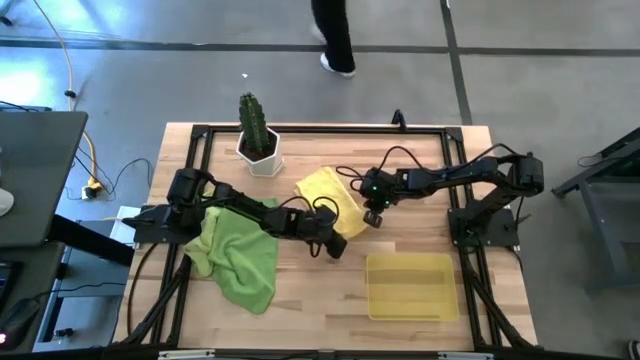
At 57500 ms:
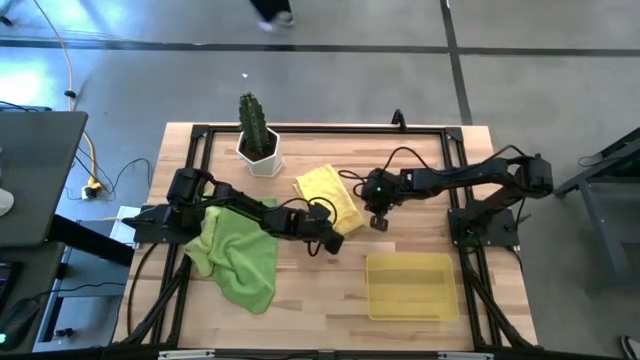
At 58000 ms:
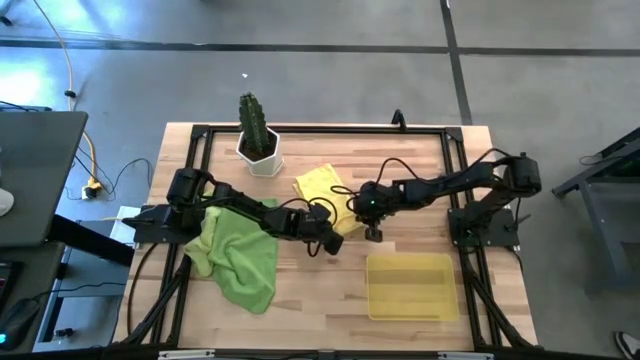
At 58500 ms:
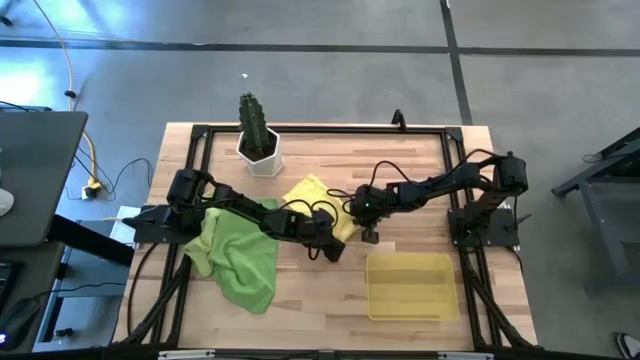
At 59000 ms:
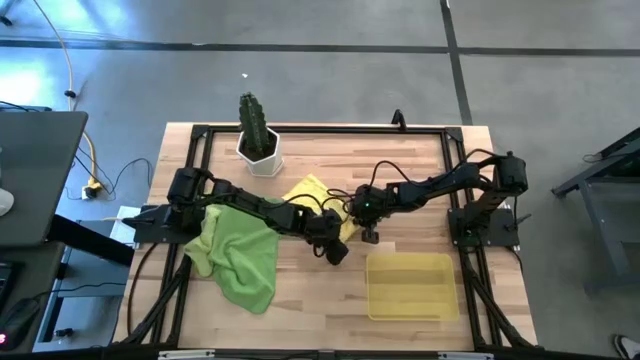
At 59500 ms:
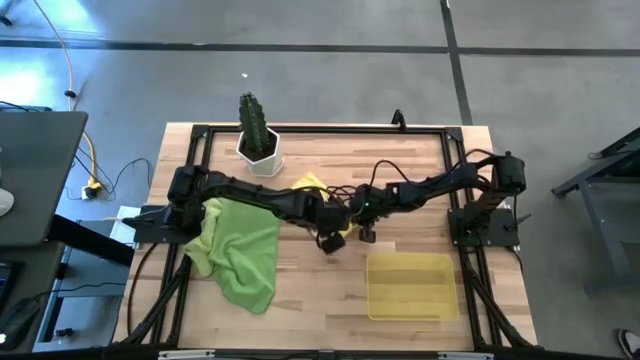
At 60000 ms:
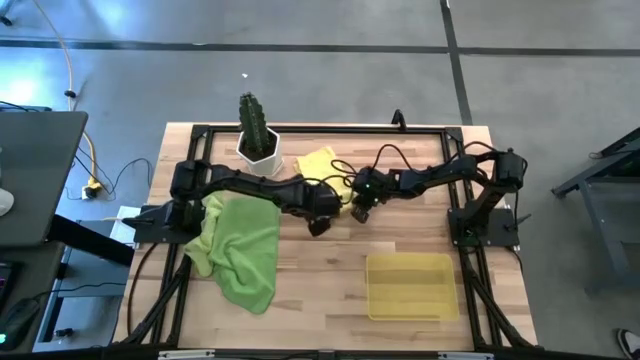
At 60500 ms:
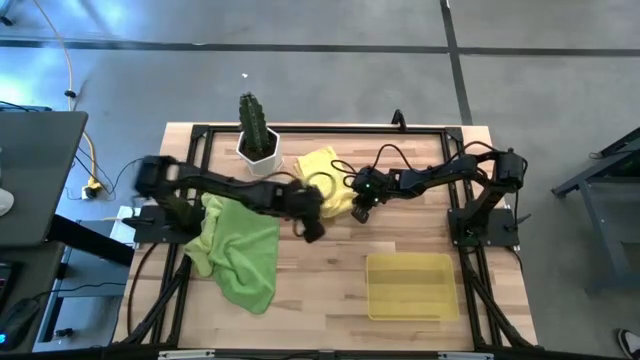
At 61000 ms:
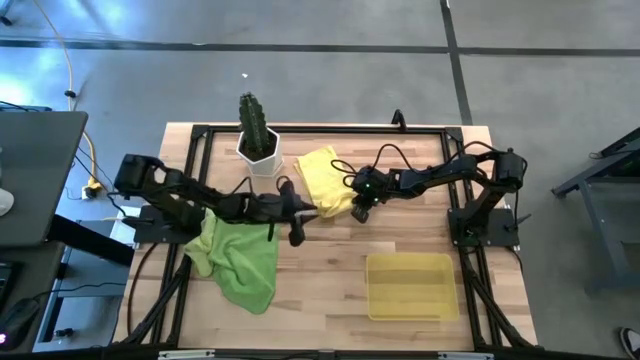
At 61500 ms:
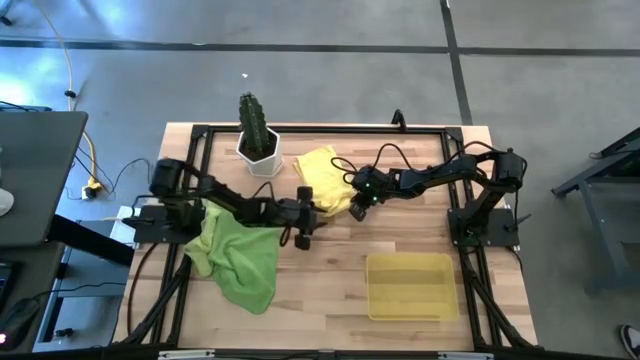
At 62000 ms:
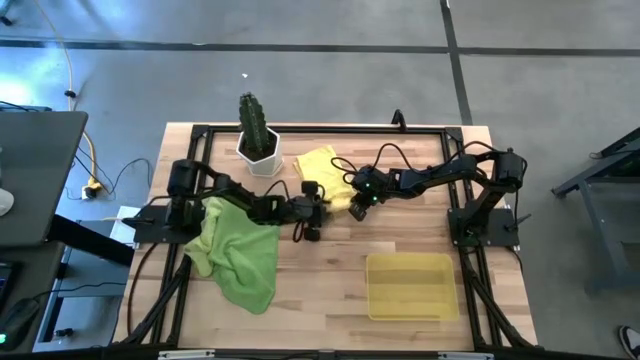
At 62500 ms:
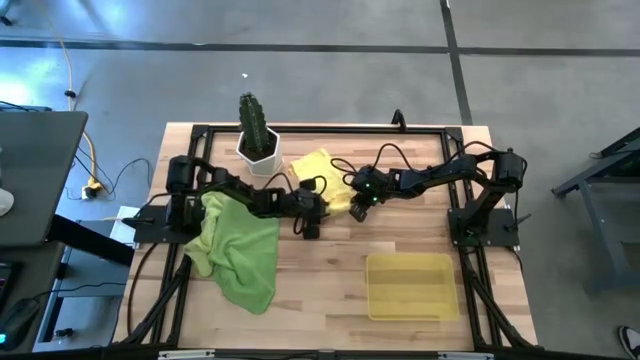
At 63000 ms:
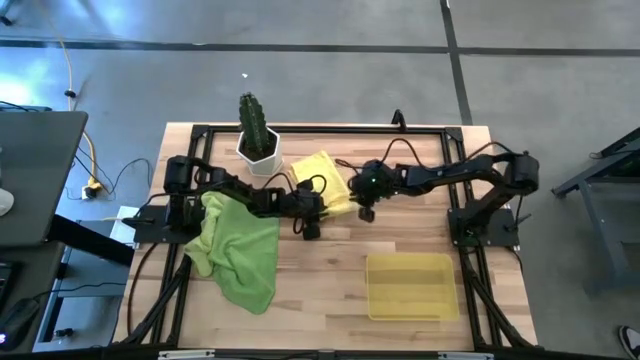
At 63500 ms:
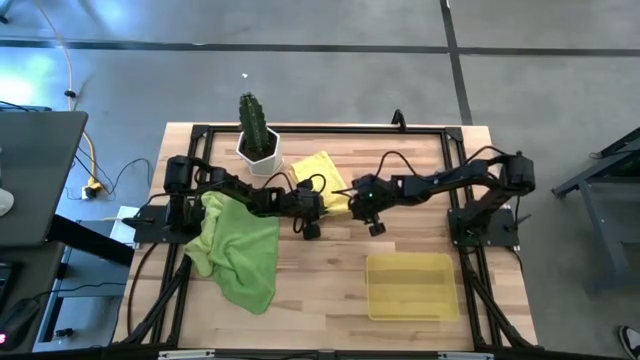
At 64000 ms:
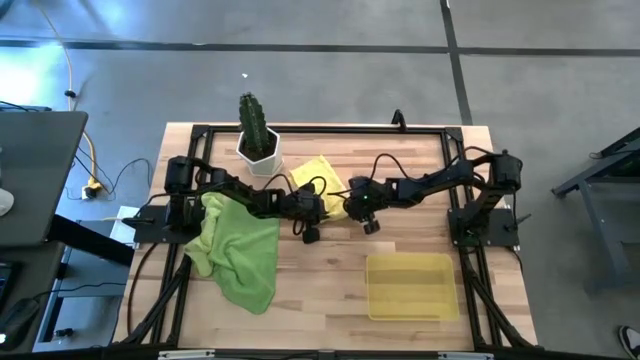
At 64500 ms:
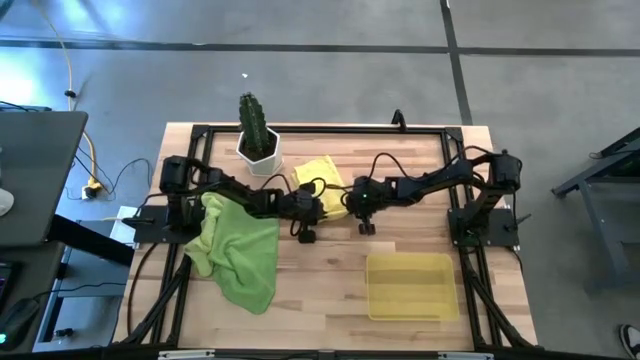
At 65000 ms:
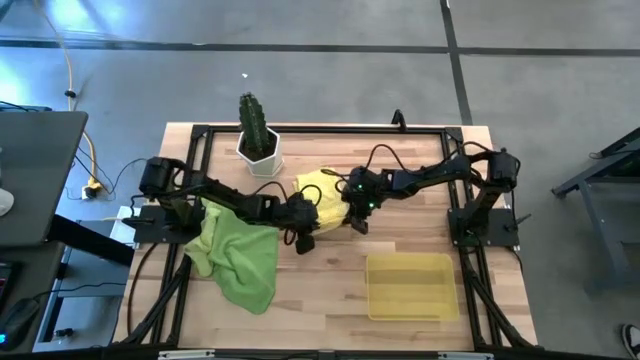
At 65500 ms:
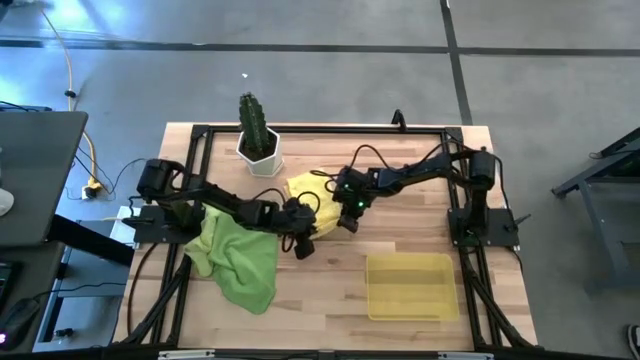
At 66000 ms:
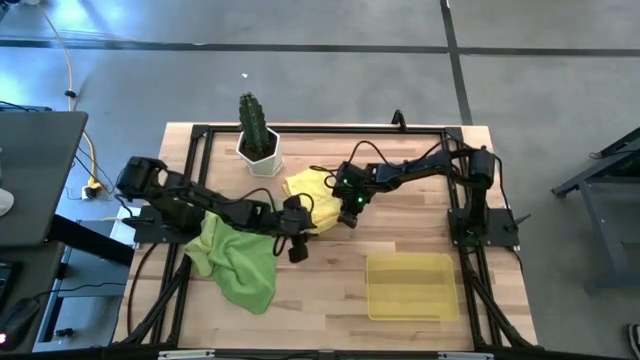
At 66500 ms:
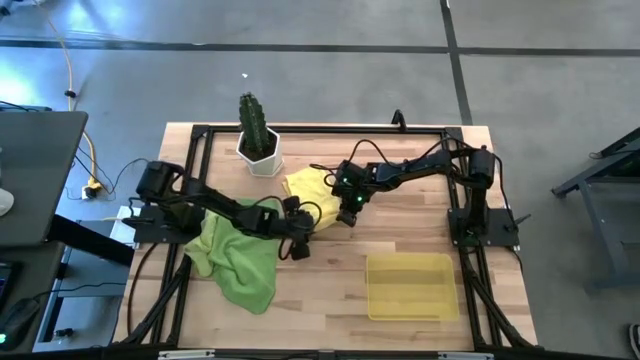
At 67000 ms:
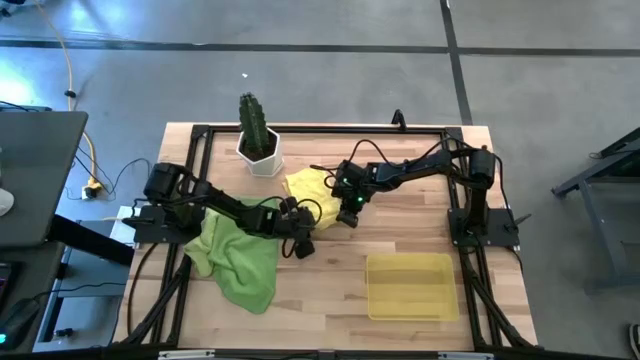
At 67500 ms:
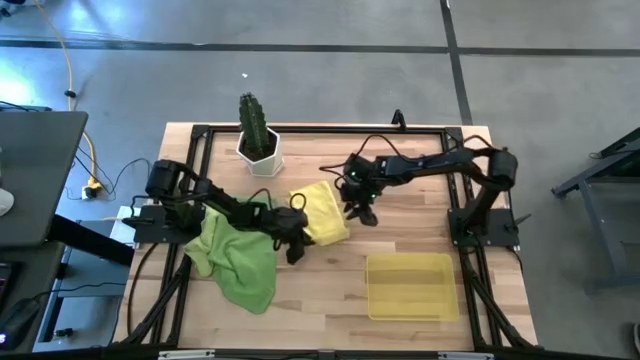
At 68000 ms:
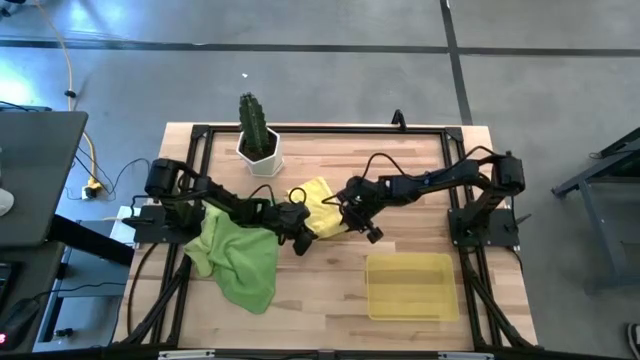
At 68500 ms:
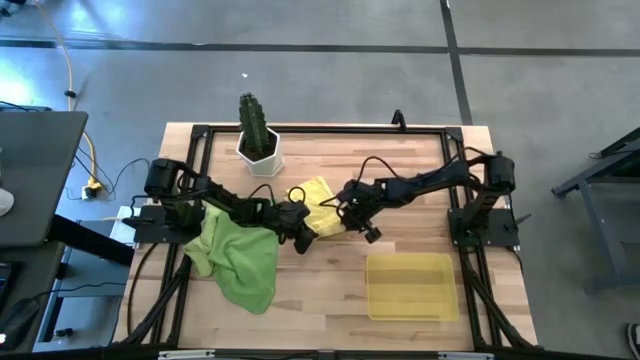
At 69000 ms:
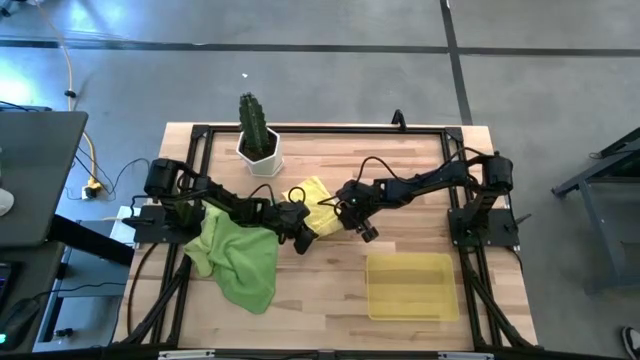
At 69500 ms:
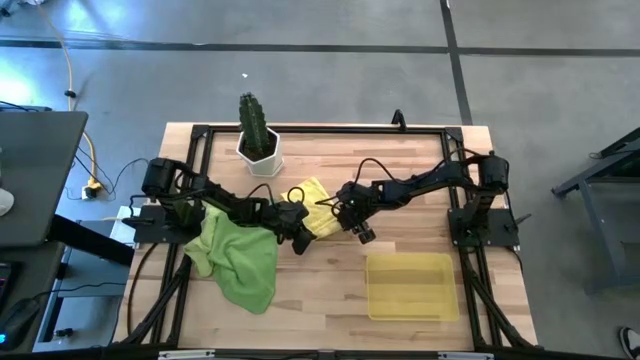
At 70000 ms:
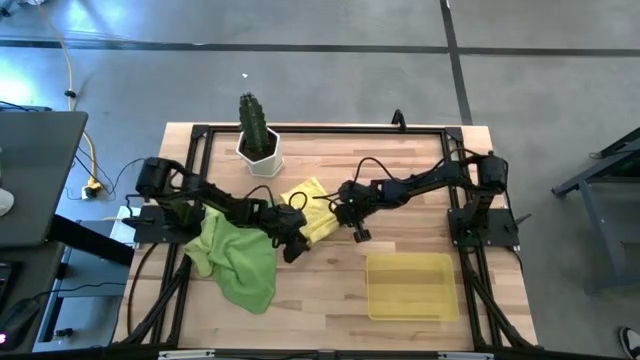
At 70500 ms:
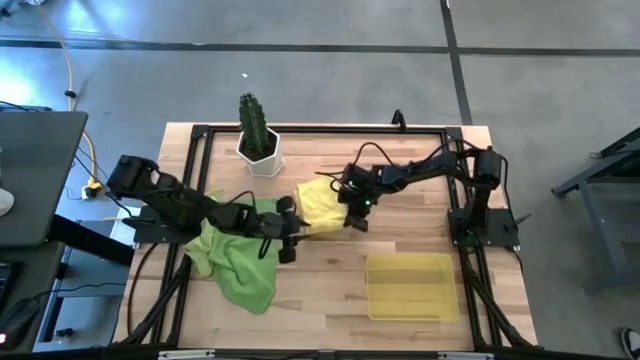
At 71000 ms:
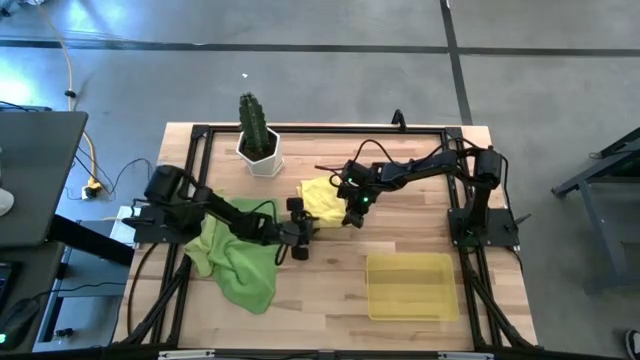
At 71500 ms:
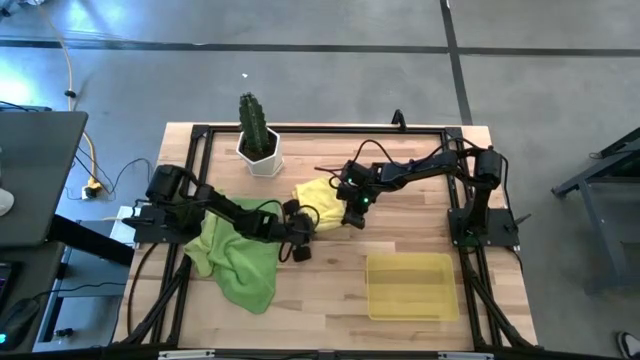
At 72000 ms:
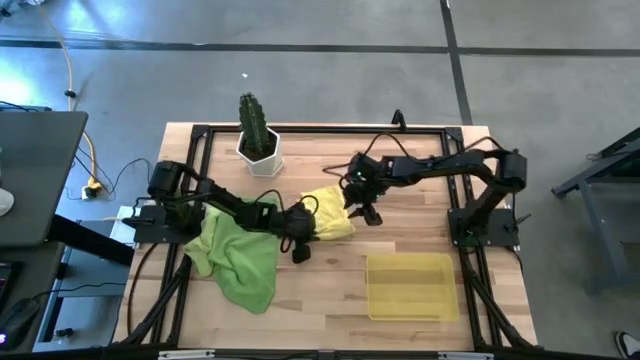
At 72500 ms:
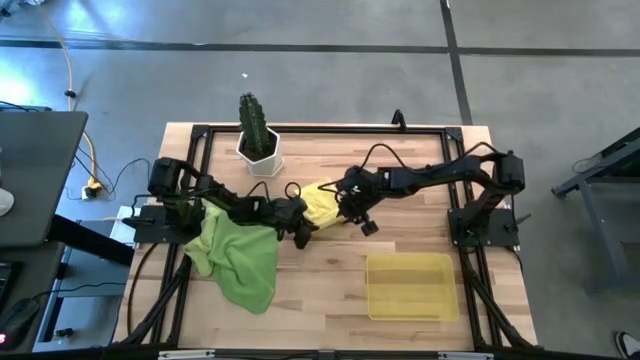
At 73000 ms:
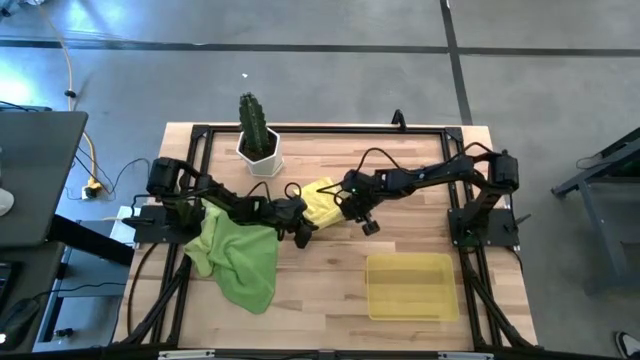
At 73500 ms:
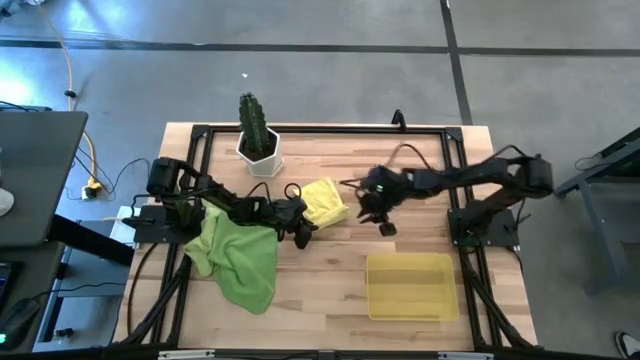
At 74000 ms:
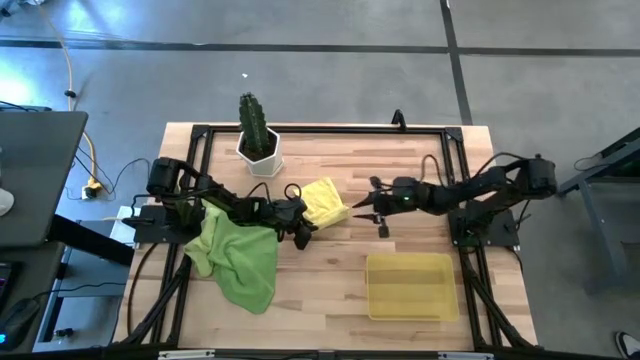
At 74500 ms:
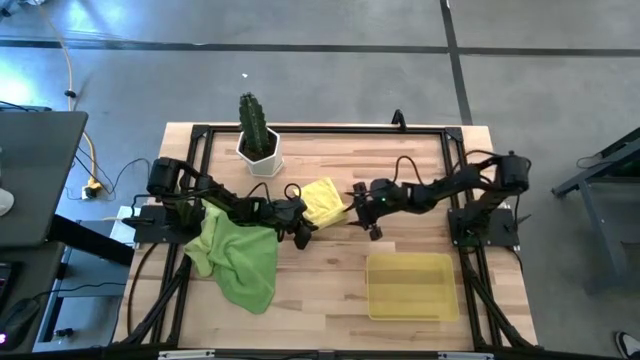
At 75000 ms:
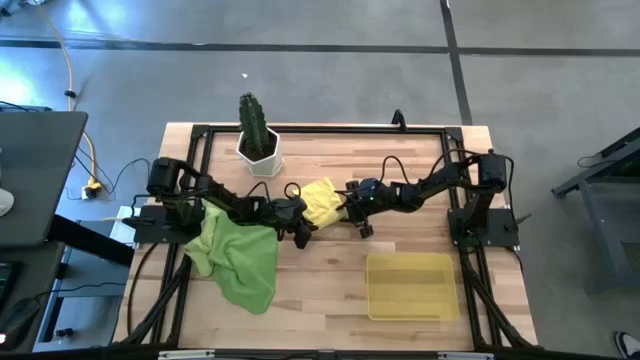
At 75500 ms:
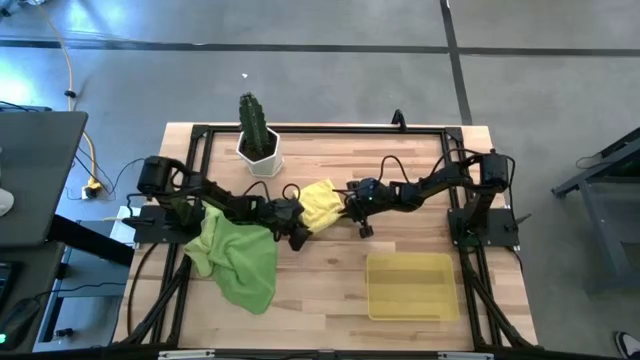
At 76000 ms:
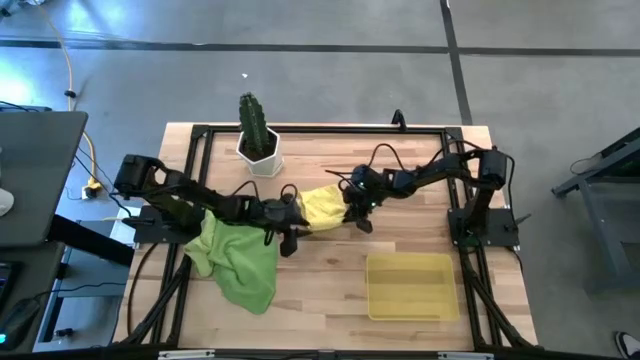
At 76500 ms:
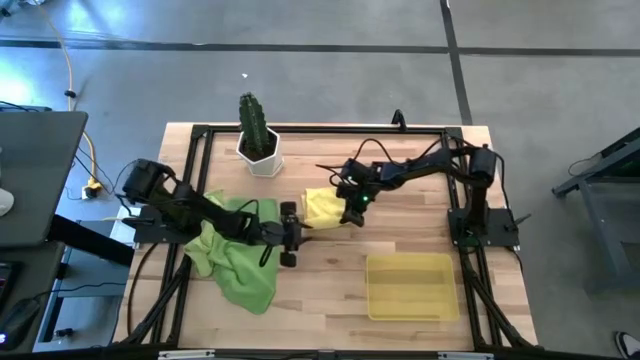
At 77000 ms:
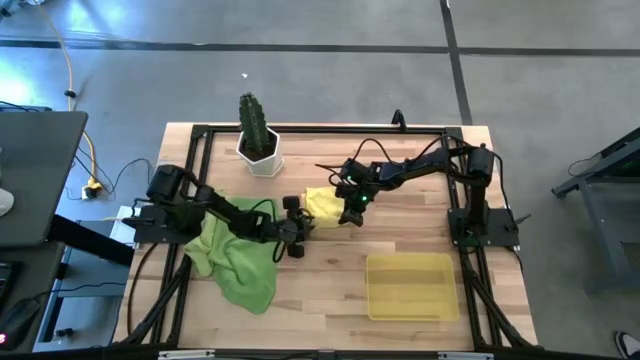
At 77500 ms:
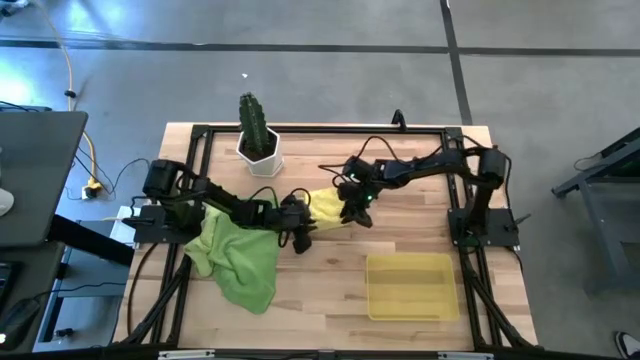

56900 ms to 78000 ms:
Task: Roll microfiber towels into tight, uniform cylinder then place into a basket
Roll the yellow towel

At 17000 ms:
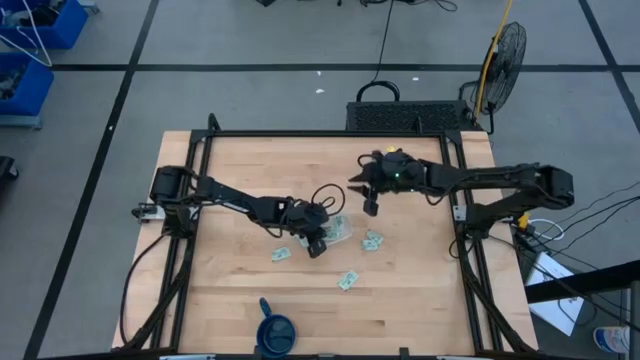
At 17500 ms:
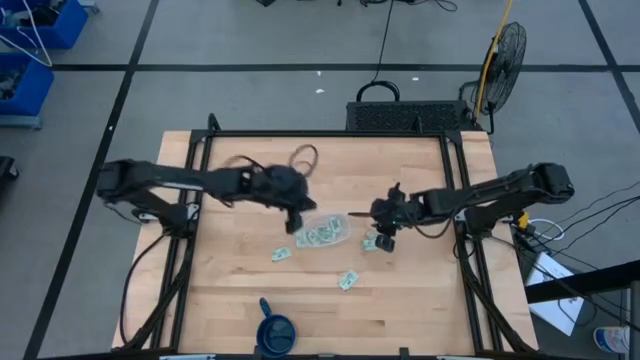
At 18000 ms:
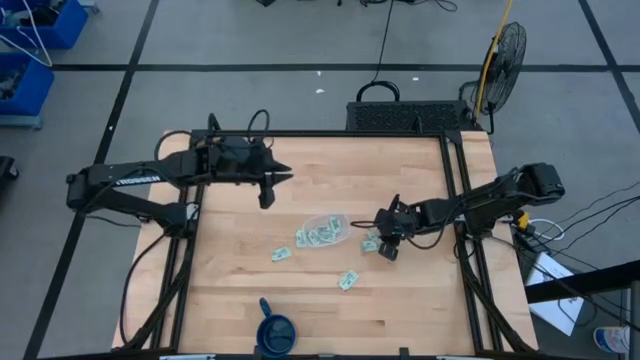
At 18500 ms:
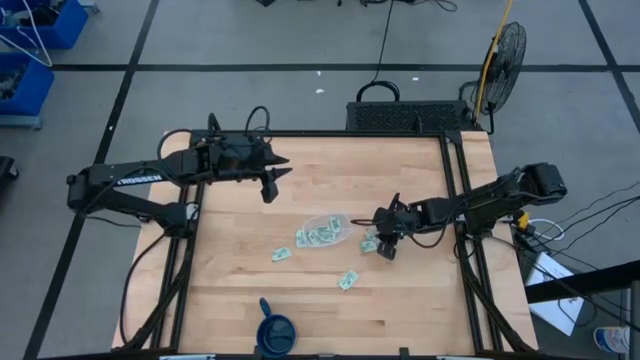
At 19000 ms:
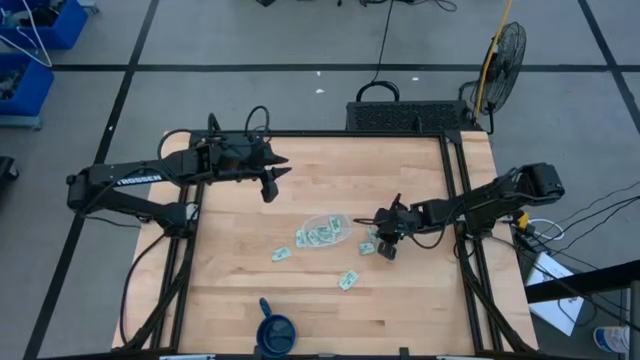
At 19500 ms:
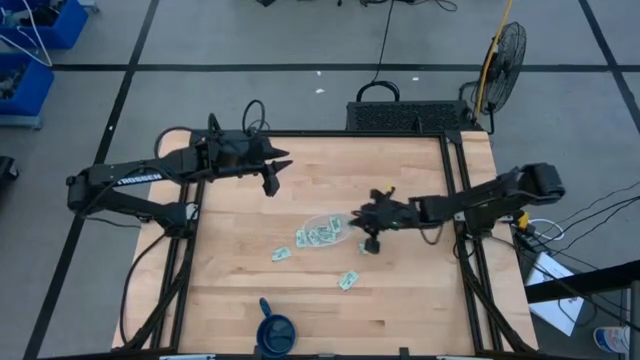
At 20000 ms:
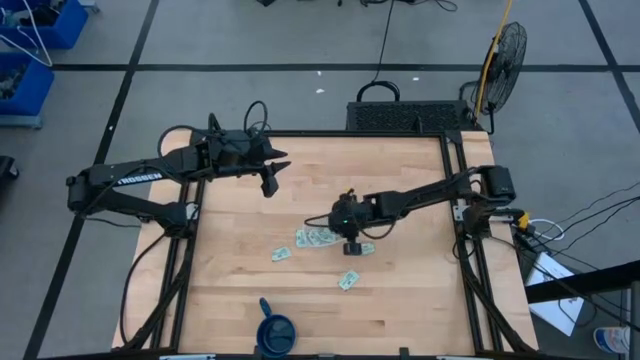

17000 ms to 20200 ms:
Task: Pick and place Stevia / Truvia into bins
Put the stevia packet into the transparent container
